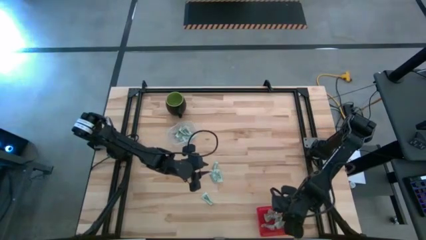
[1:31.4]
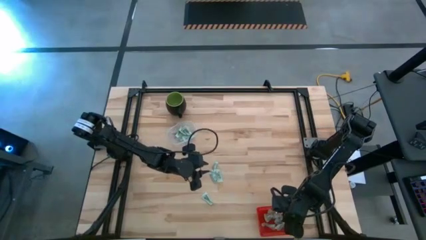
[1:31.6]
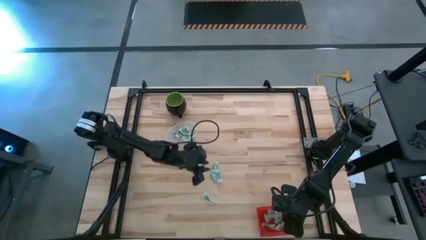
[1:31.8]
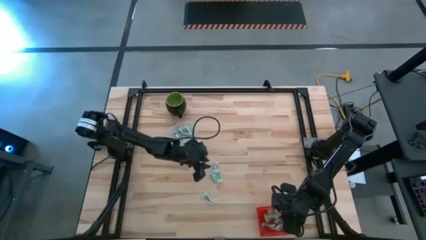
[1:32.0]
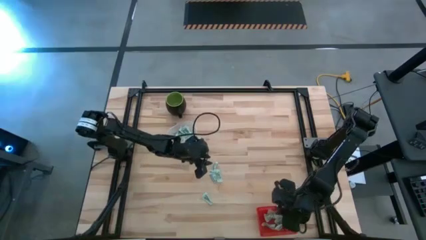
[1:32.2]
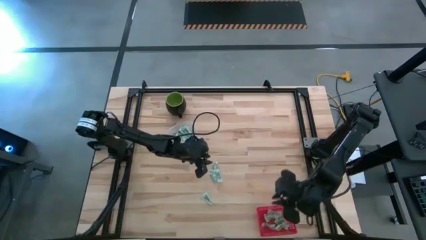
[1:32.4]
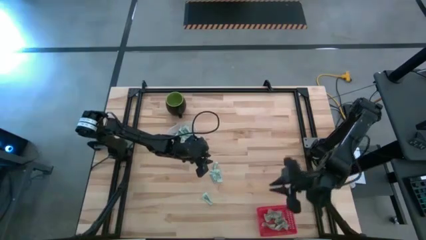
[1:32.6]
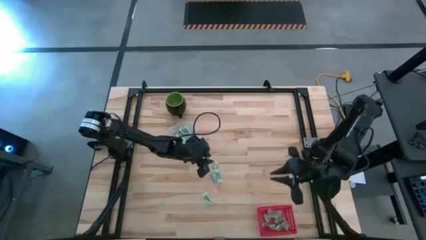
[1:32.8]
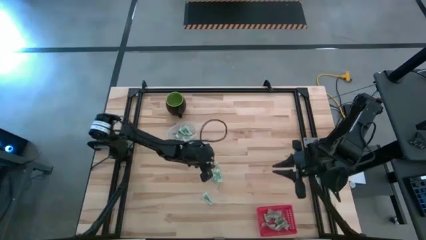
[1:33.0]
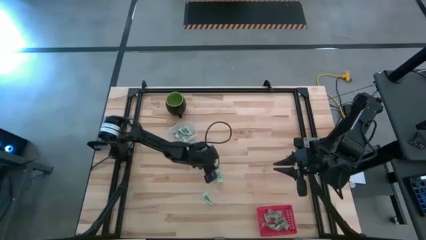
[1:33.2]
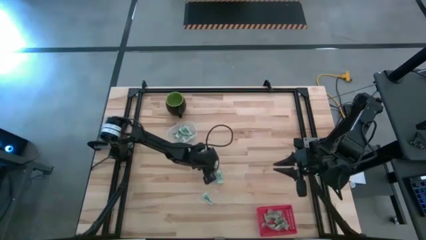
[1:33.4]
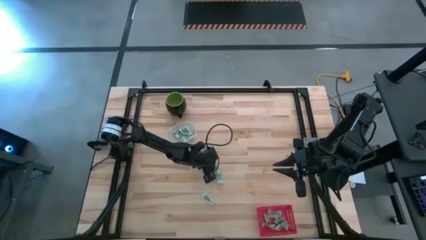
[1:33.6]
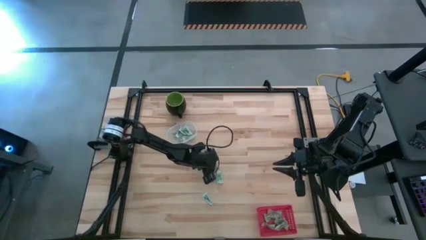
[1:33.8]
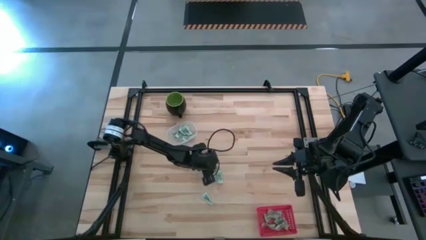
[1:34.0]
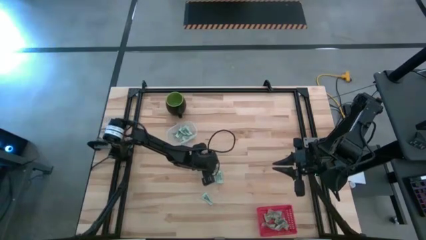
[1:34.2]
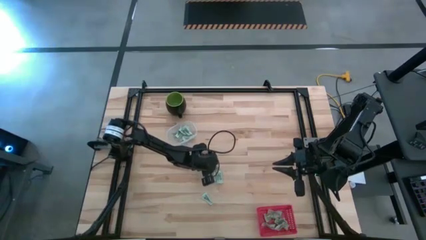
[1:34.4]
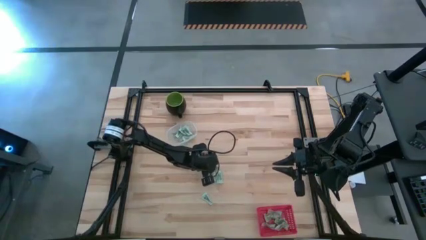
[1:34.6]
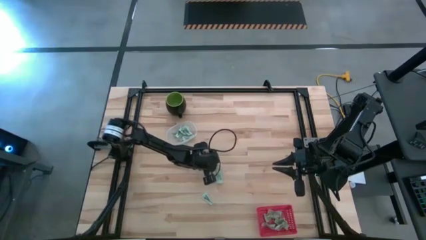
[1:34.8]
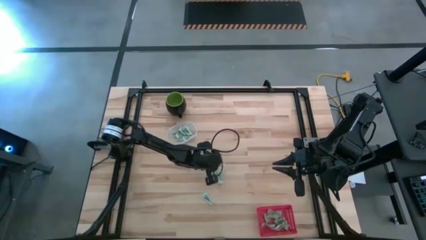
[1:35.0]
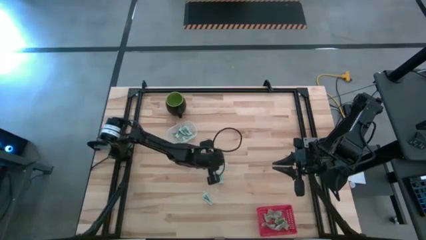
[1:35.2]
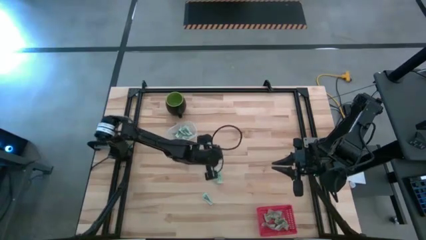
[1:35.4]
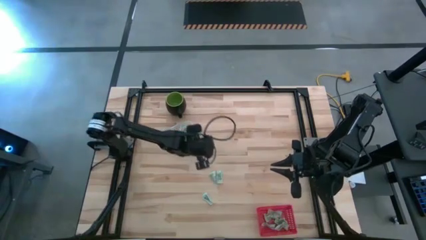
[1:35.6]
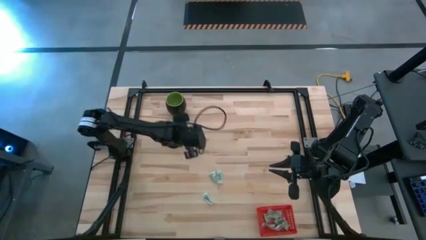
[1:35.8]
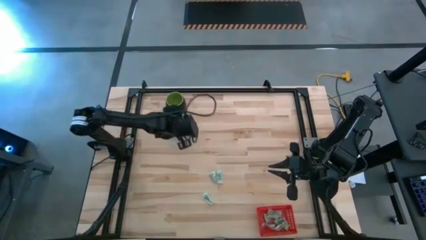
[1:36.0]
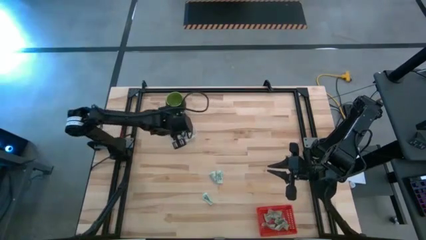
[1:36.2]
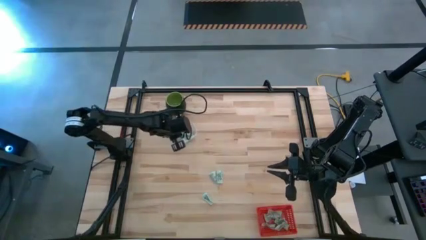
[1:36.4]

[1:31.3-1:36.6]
Task: Pick and place items into bin
Put the green stevia packet into the transparent bin

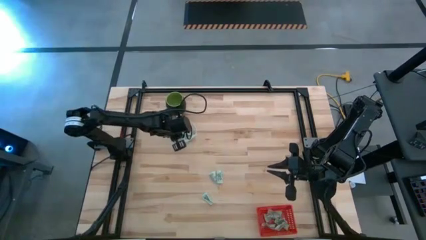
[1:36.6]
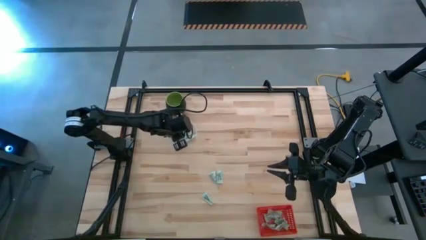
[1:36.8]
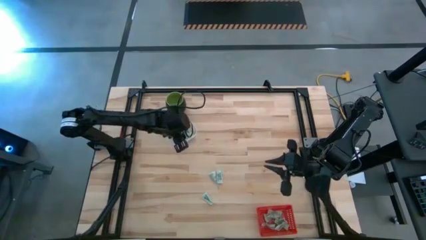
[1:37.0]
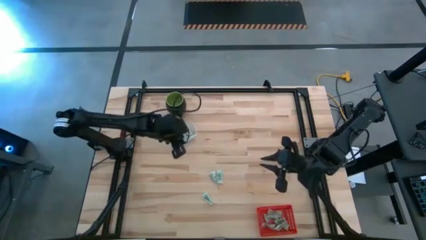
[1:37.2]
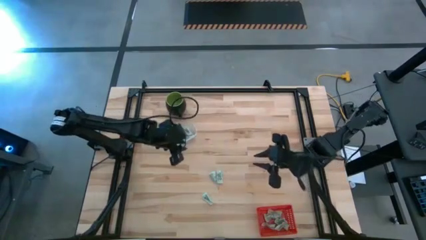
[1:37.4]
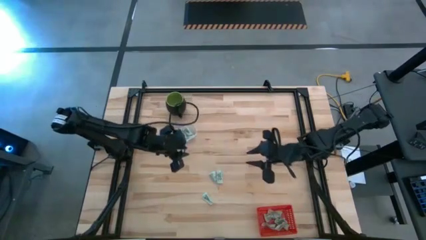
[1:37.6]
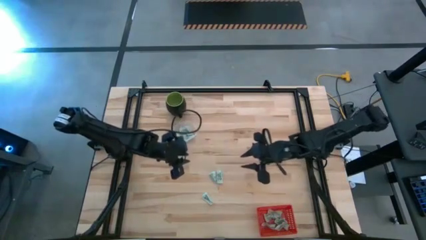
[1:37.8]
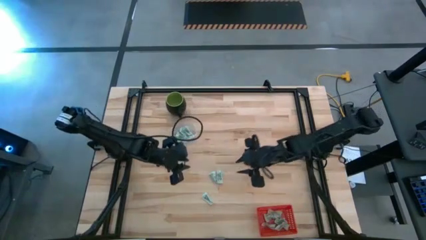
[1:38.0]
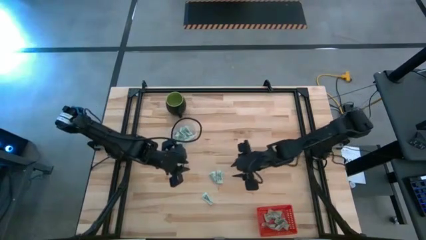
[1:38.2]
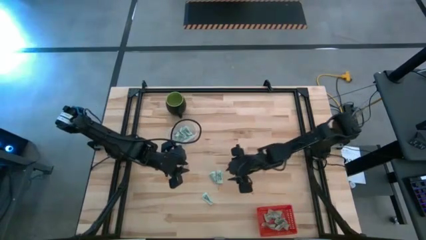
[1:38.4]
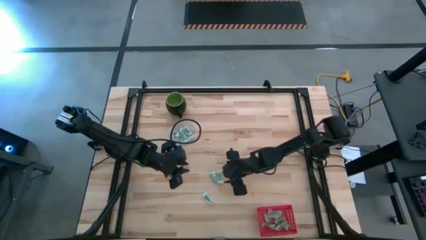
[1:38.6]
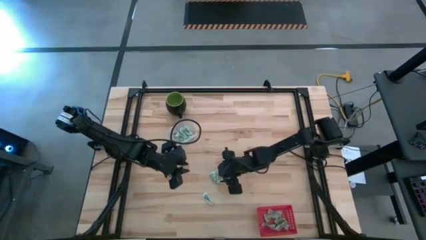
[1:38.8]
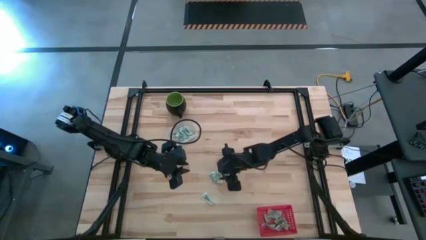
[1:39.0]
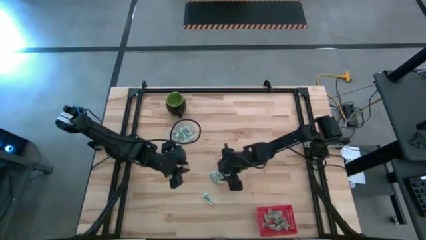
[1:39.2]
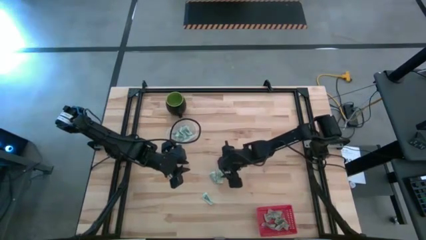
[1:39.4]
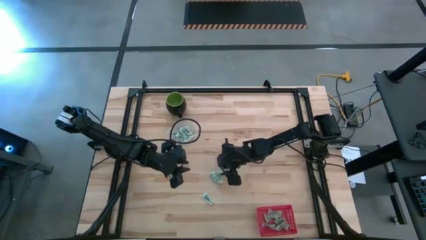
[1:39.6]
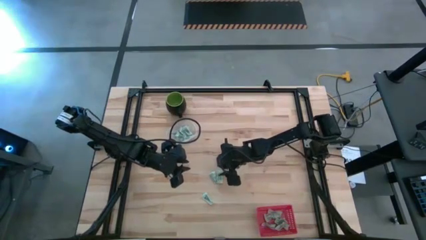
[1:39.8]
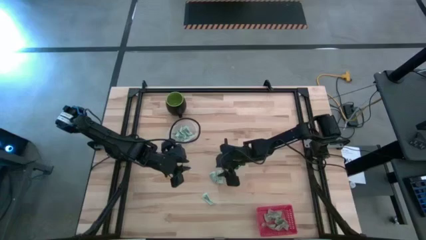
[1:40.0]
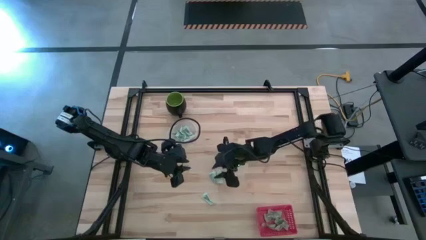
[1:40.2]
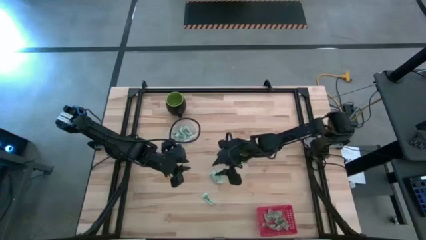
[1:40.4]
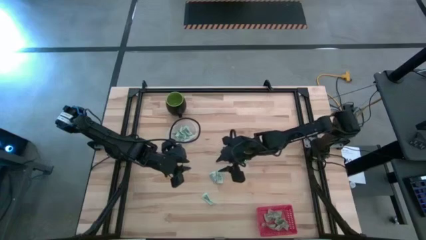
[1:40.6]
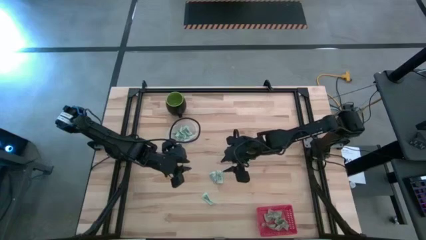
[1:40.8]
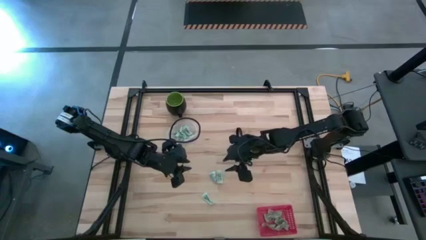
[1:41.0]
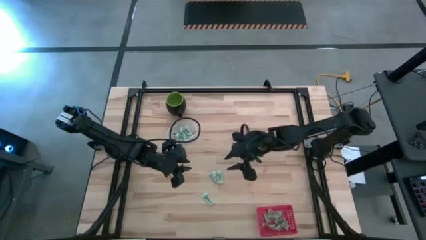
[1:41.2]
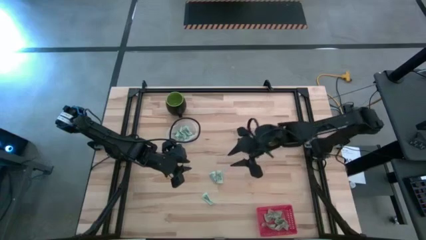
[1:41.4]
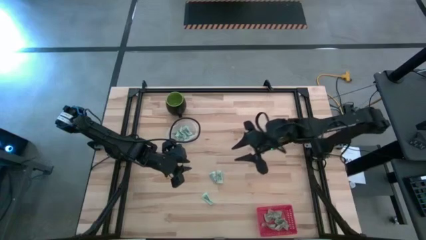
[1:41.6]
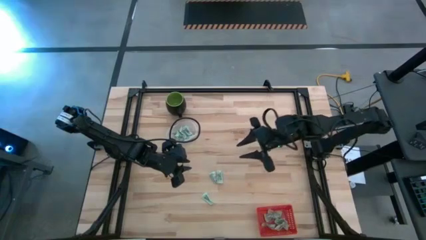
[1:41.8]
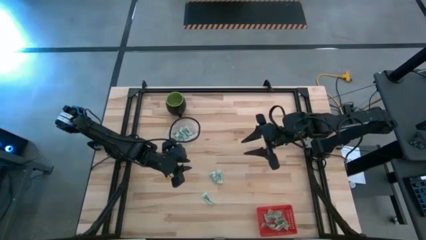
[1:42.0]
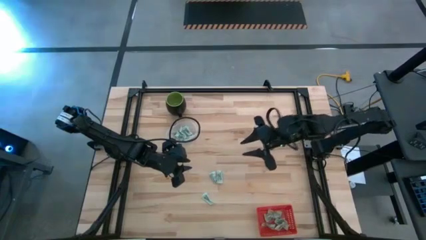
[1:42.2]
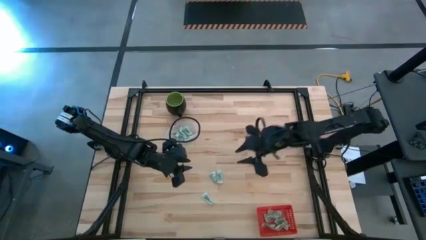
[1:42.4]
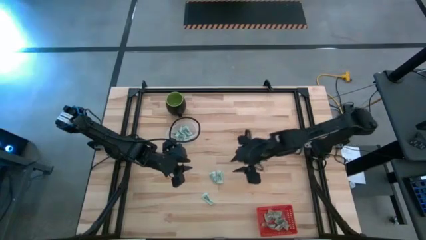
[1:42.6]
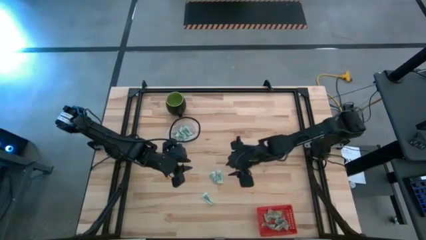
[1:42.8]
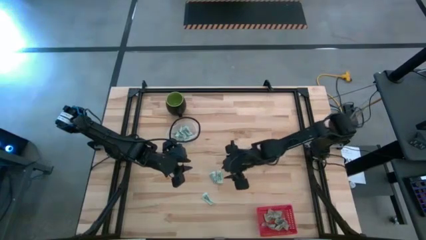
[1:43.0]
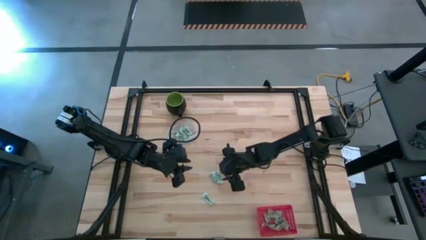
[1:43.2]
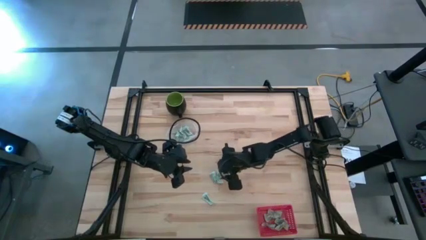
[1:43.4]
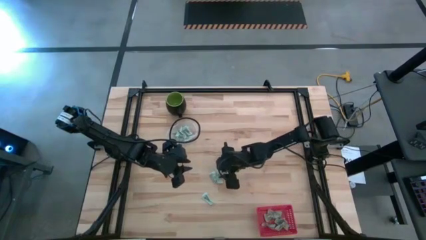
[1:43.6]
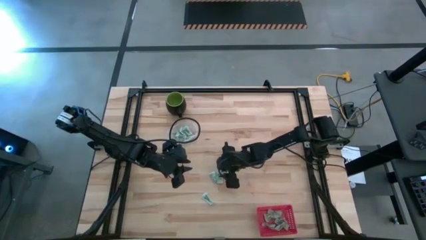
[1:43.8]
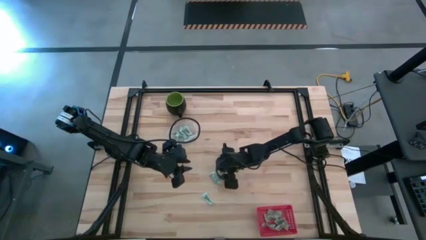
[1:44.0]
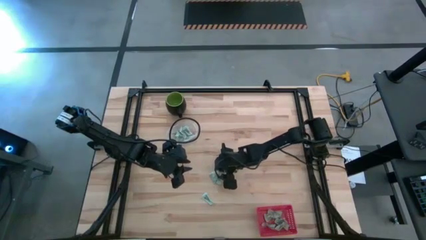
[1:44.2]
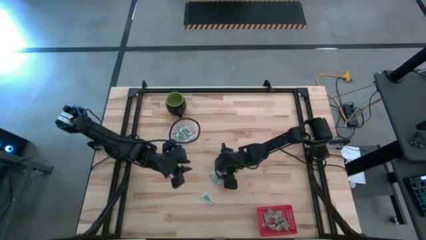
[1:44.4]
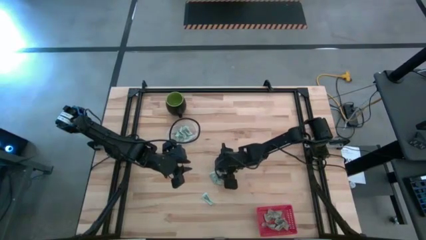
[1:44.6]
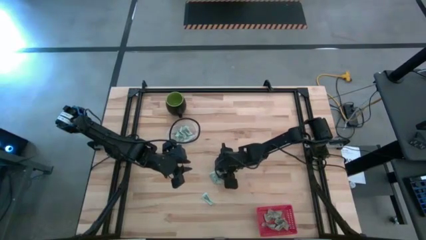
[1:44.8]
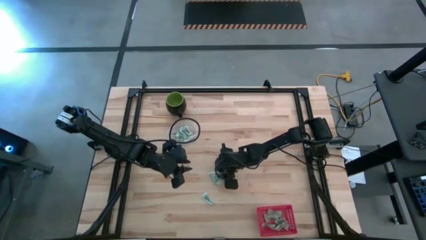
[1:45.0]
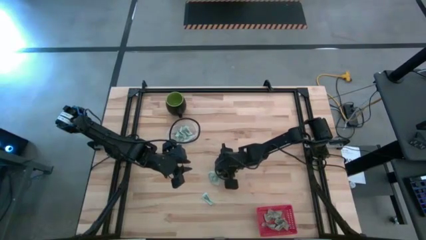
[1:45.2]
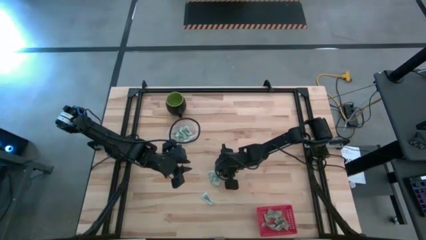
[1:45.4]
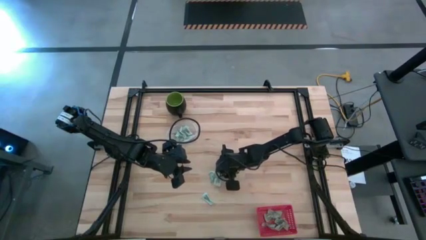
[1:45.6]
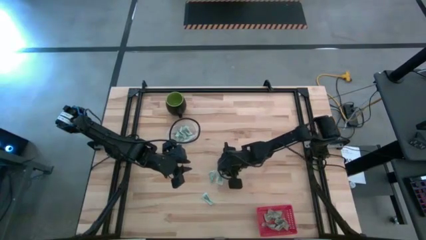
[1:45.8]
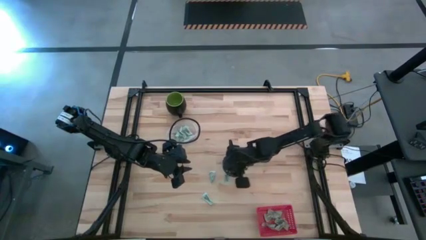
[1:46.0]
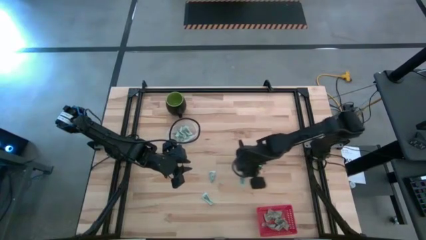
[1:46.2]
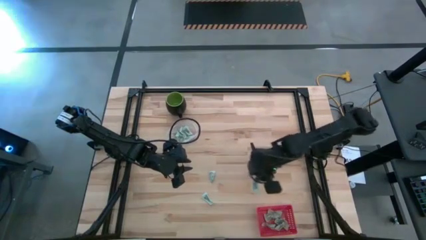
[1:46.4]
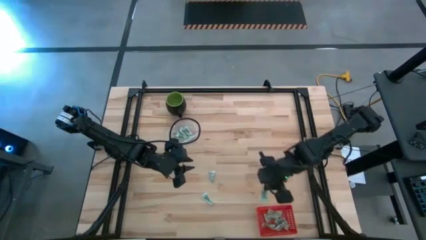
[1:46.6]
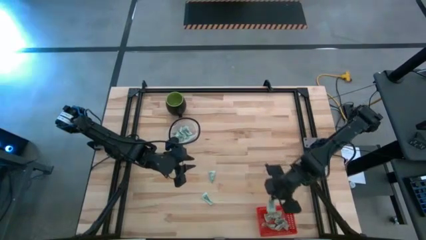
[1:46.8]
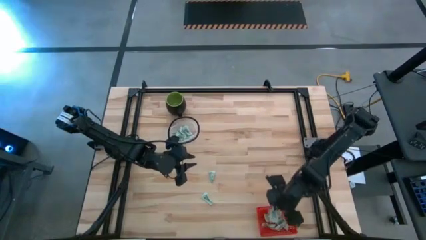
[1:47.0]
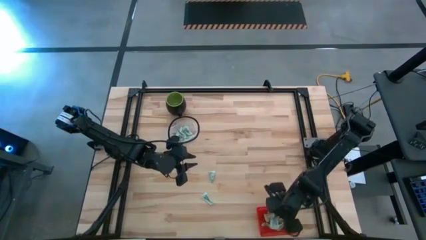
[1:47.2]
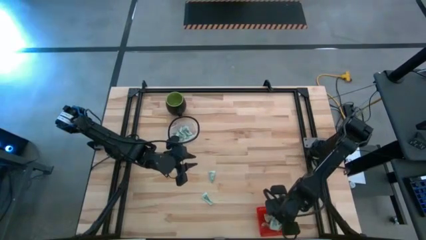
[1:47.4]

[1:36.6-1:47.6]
Put the green stevia packet into the red basket
